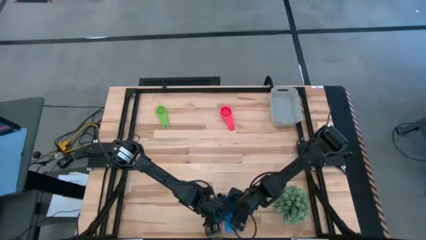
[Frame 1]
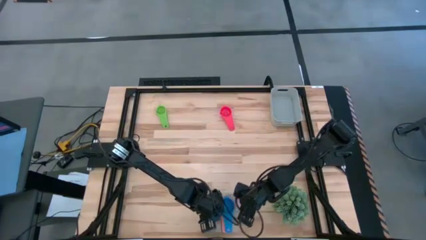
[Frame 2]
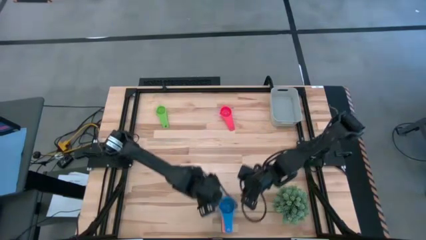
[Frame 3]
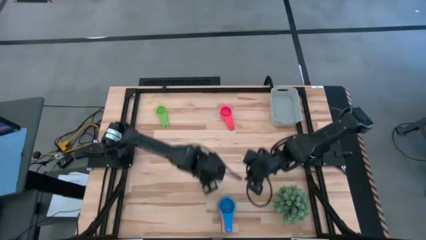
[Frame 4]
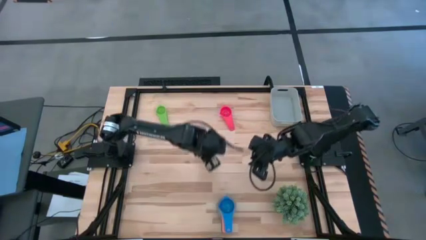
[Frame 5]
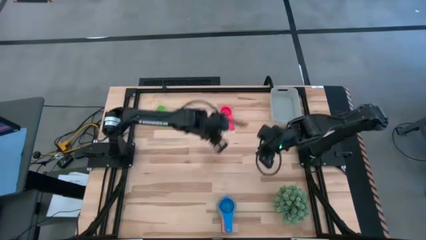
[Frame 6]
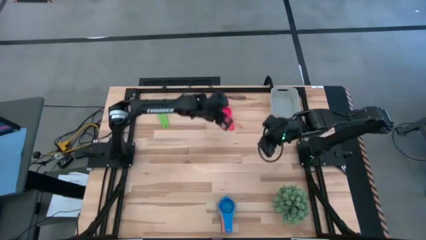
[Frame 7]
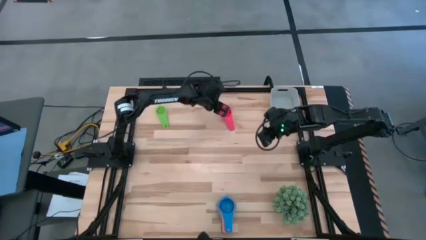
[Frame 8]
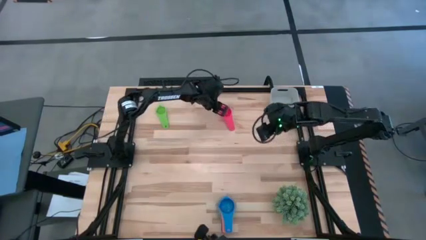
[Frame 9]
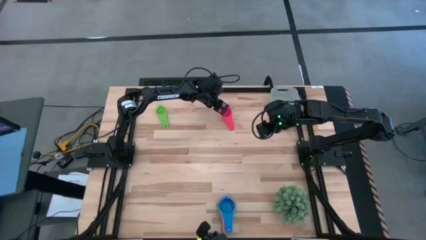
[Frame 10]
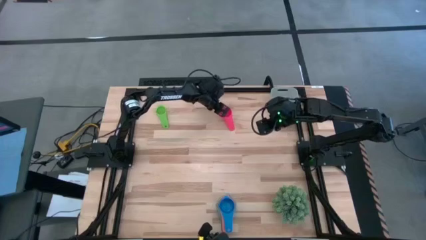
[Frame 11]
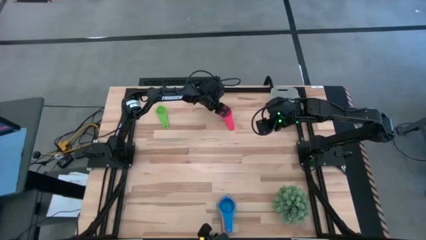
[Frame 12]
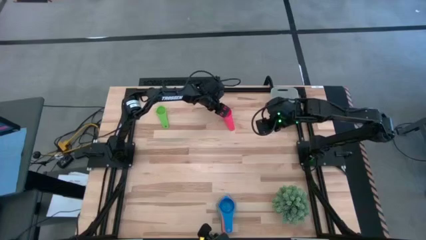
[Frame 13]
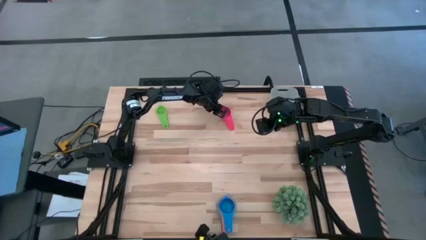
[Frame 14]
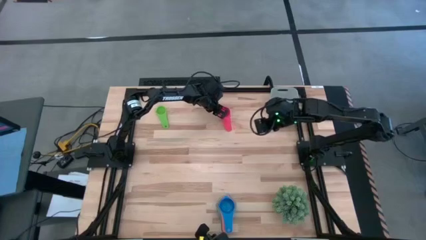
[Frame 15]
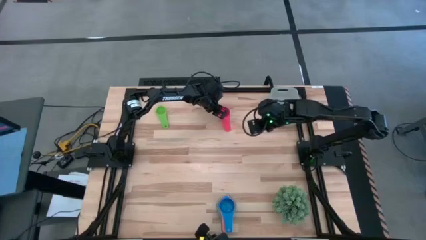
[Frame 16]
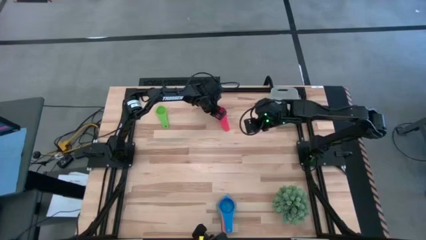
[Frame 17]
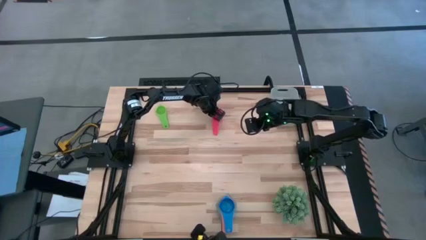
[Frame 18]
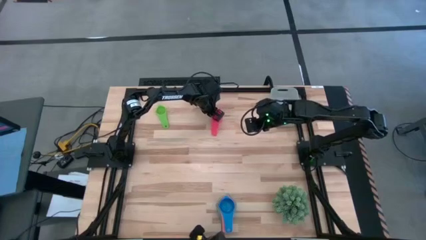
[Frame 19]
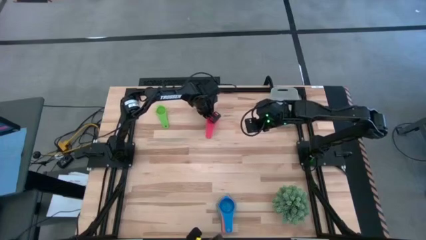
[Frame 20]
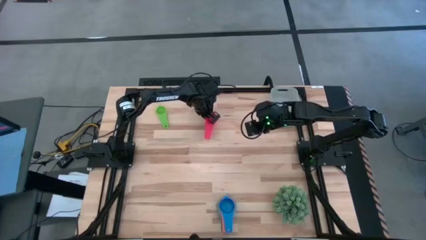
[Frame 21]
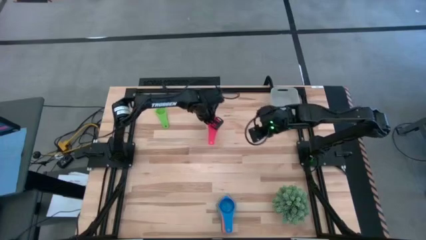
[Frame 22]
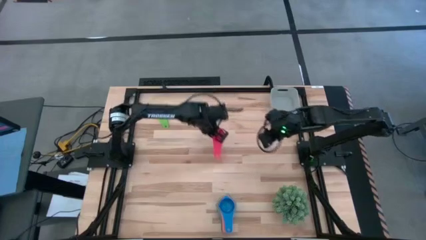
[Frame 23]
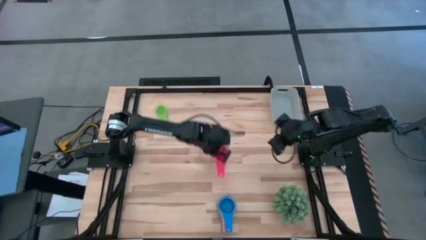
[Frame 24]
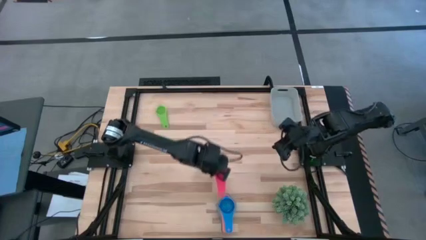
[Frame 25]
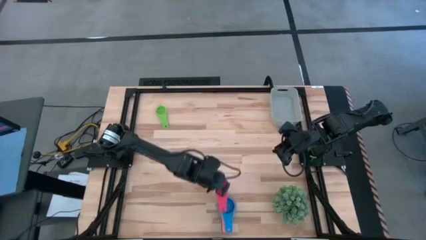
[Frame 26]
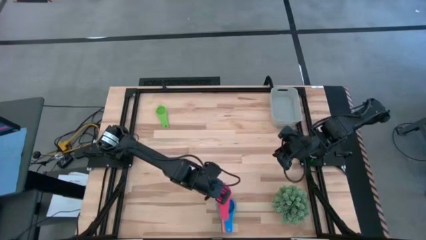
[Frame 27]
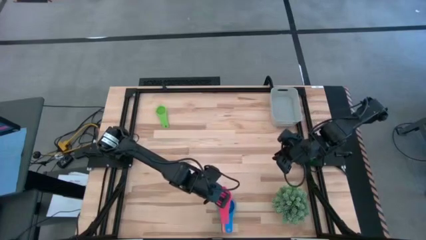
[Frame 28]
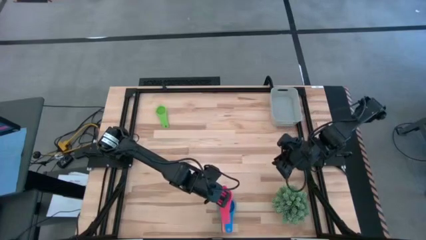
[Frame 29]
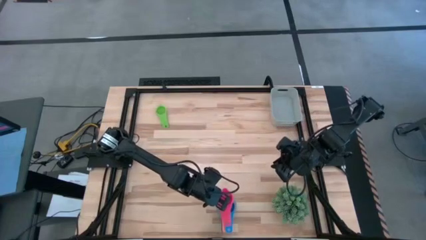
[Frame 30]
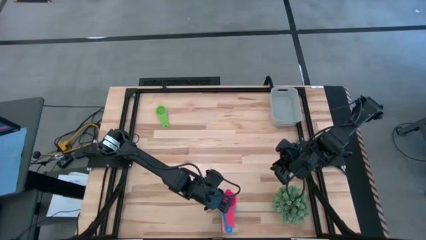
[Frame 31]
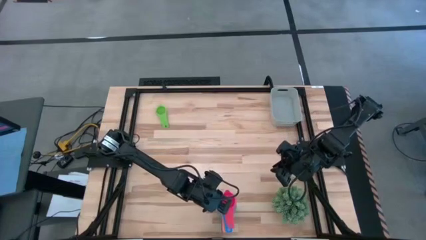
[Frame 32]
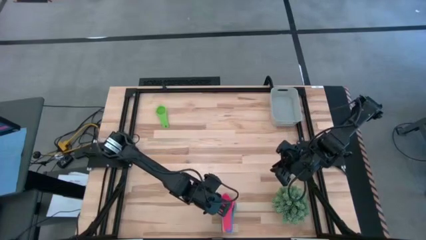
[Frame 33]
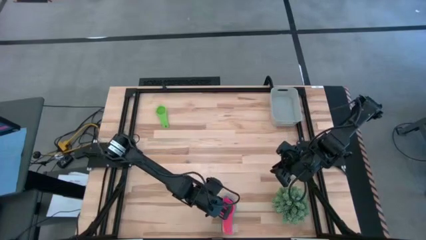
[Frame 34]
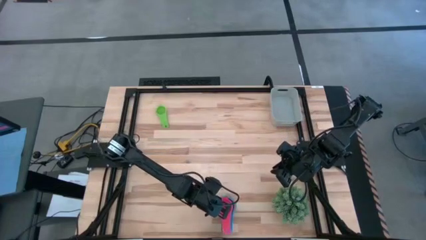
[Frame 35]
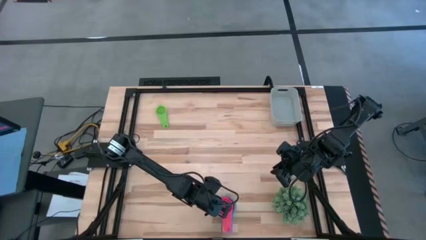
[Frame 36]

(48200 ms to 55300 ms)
Task: Nest measuring cups in basket
Stack the red measuring cup on top of the blue of measuring cup

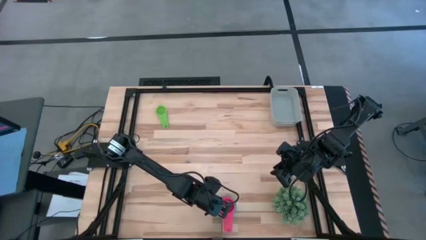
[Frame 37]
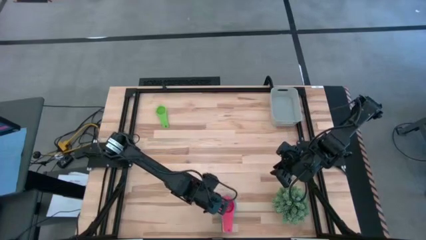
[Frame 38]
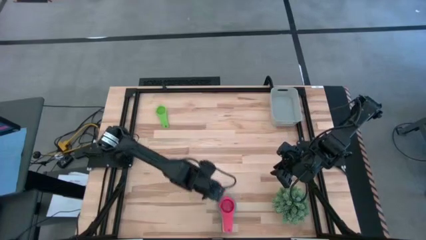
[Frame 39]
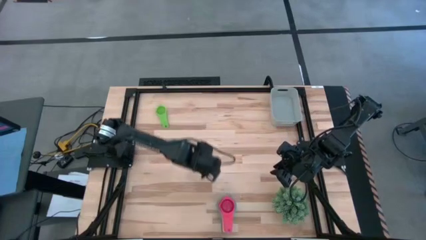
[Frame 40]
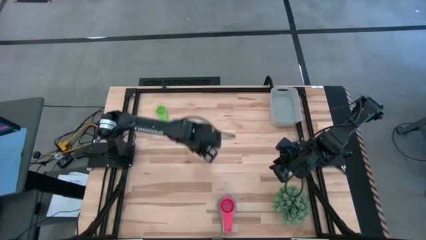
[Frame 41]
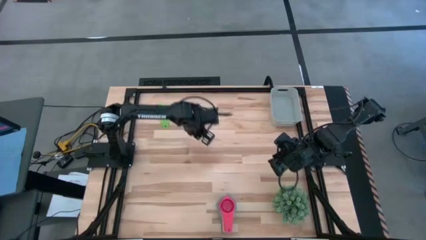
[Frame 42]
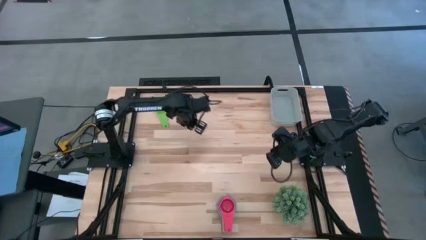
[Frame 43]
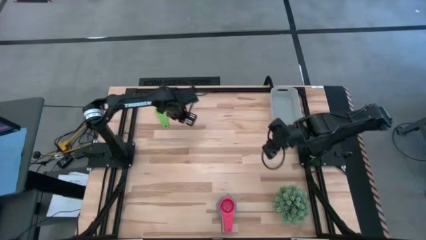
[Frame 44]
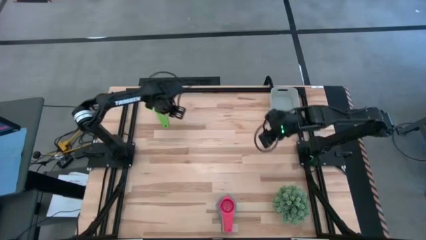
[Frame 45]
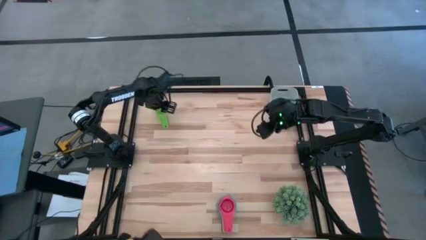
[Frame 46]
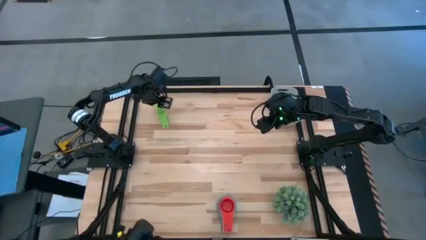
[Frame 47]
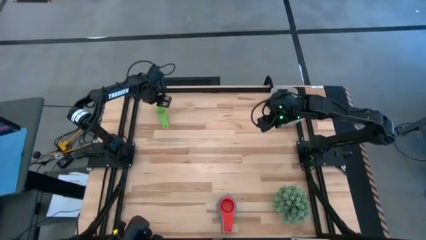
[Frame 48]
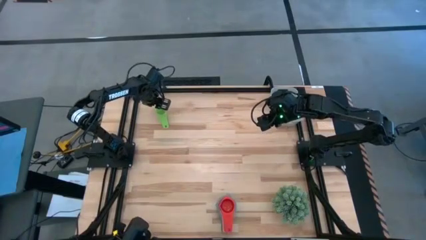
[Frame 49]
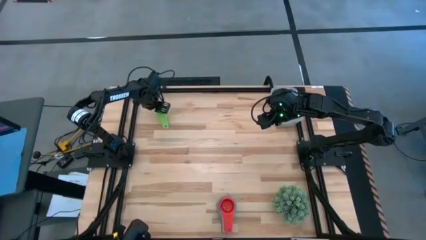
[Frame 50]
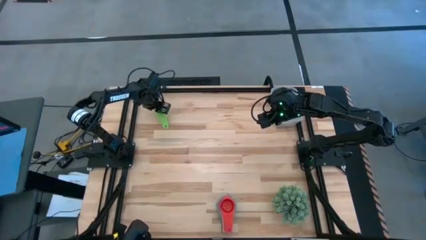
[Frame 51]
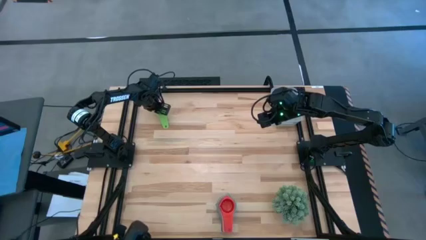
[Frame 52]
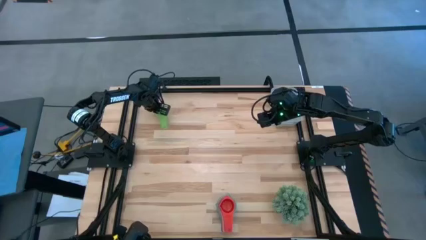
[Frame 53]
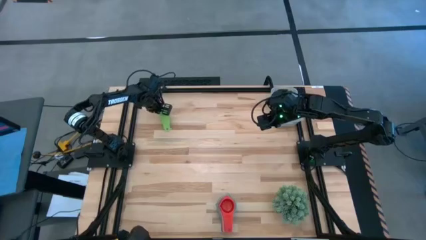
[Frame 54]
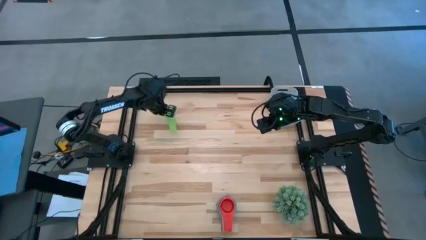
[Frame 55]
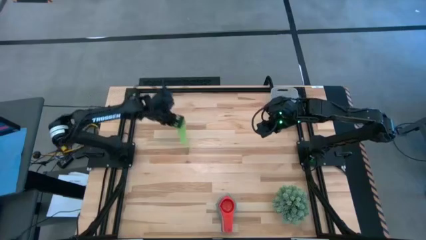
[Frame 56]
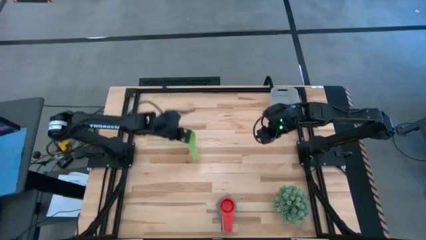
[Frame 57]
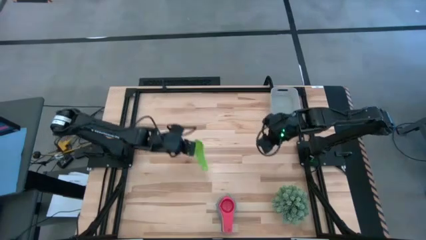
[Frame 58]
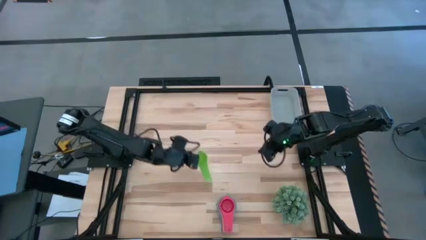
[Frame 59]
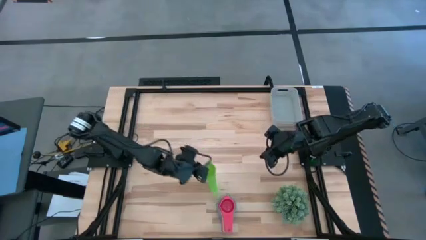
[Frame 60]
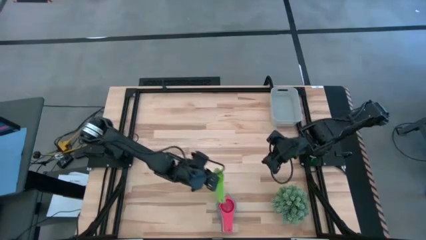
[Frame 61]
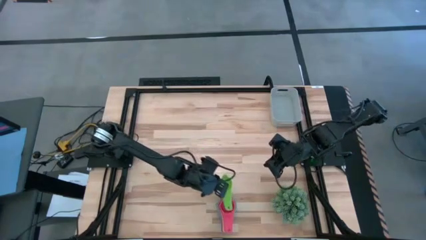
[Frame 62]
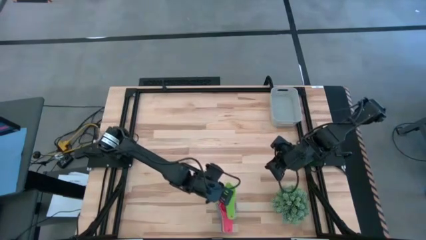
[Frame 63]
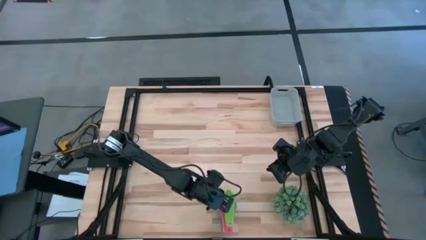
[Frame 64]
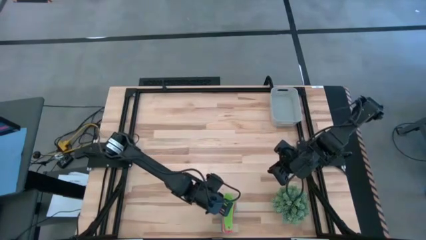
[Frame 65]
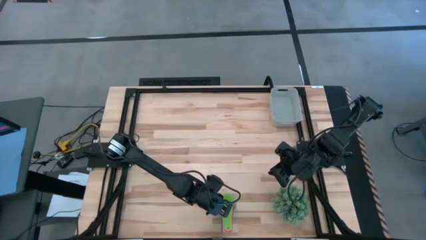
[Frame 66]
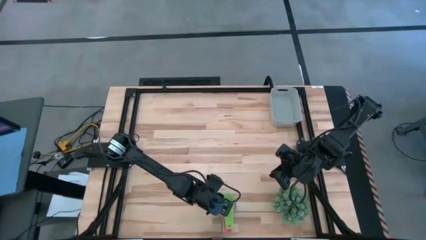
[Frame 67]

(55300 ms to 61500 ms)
Stack the green measuring cup on top of the red of measuring cup

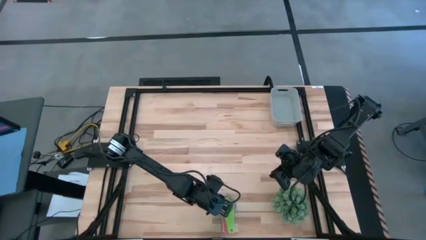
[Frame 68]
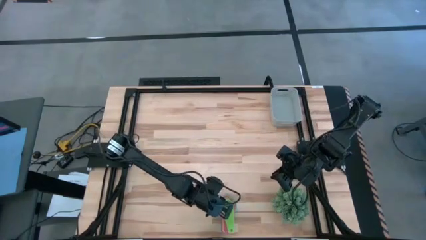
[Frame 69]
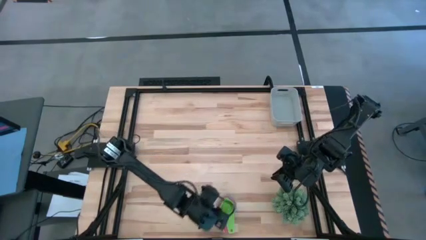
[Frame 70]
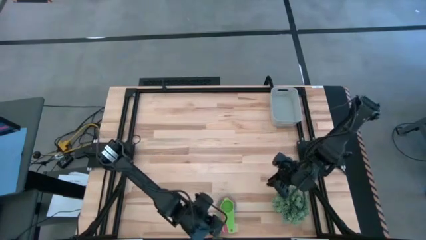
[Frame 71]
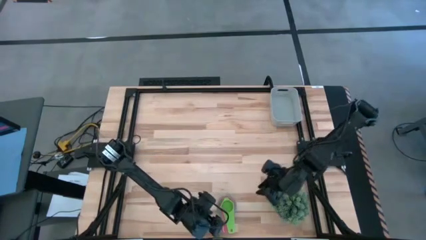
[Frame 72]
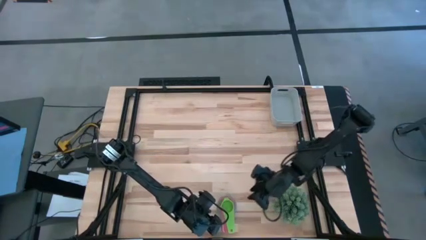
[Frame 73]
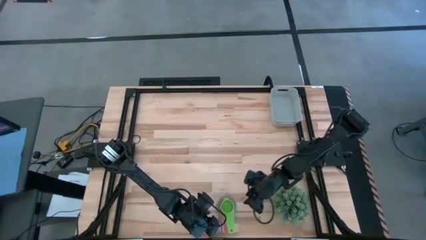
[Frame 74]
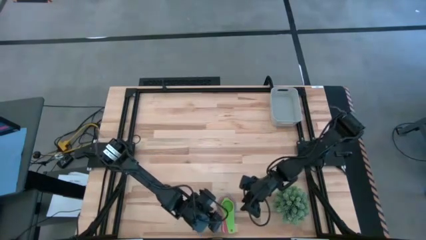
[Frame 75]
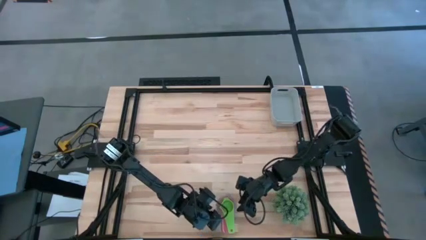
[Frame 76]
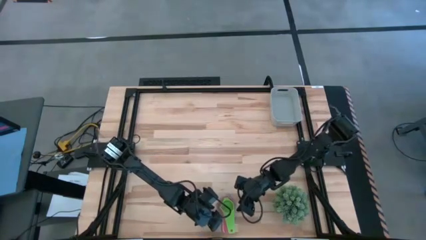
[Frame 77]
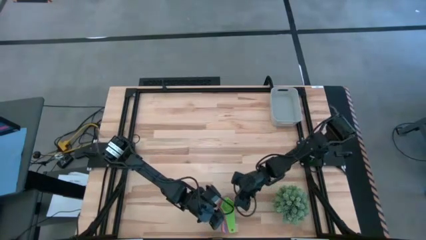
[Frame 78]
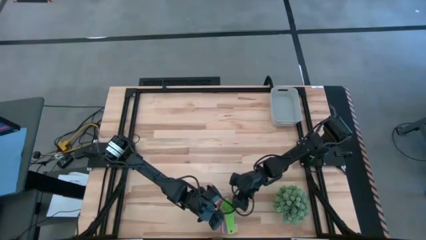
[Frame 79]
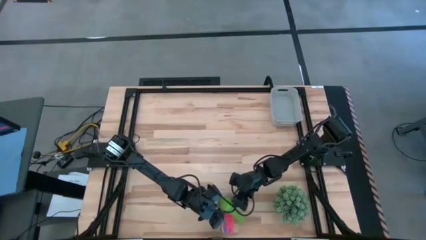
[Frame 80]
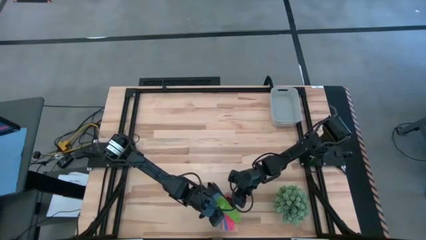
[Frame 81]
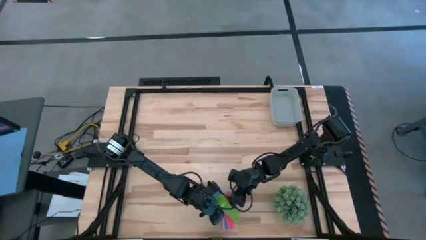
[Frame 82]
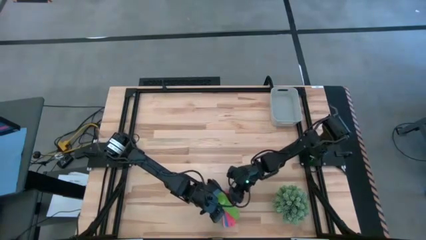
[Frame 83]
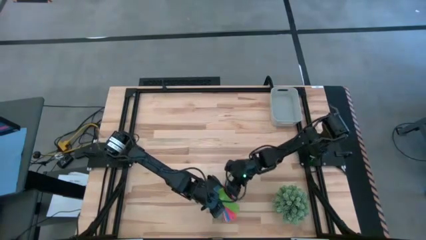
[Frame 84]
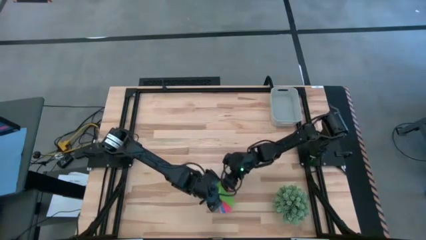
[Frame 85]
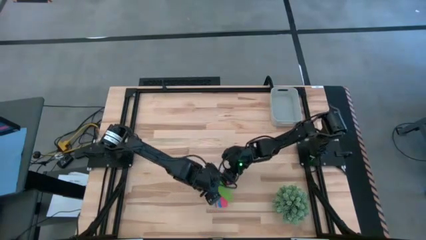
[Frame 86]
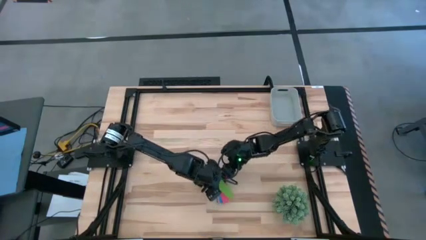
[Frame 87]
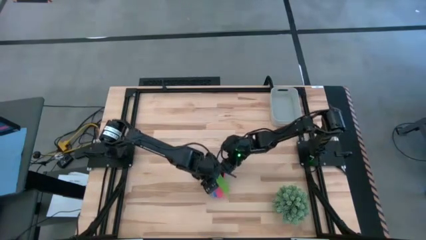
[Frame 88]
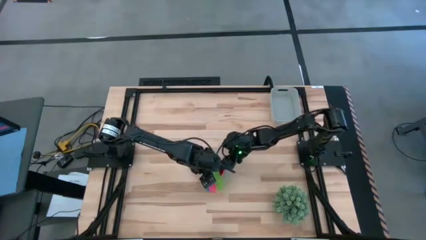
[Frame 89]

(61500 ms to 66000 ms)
Put the stack of measuring cup into the gray bin
